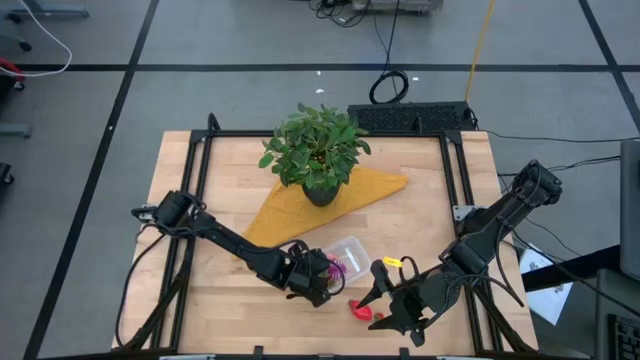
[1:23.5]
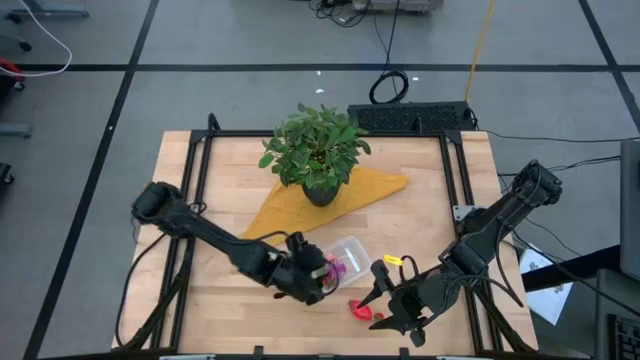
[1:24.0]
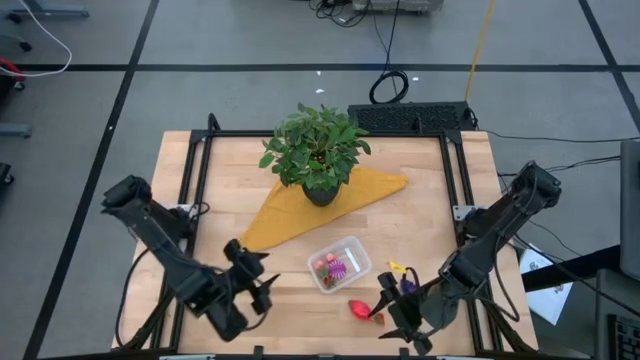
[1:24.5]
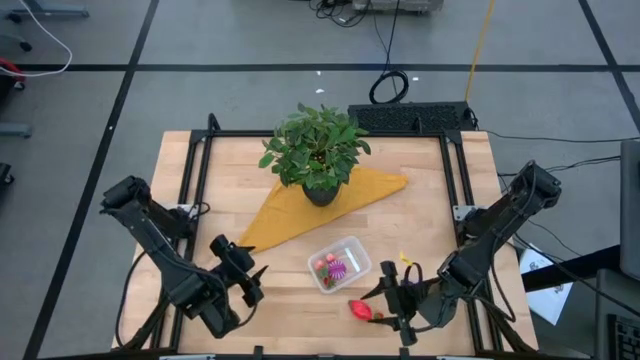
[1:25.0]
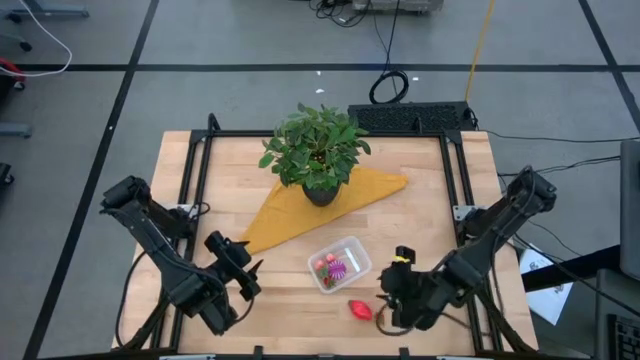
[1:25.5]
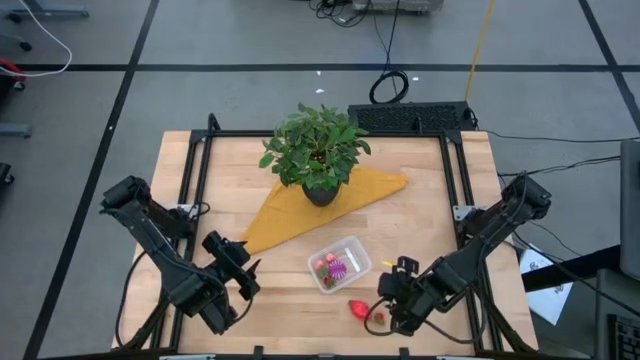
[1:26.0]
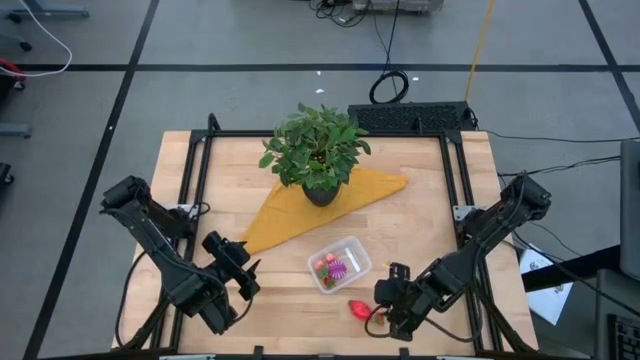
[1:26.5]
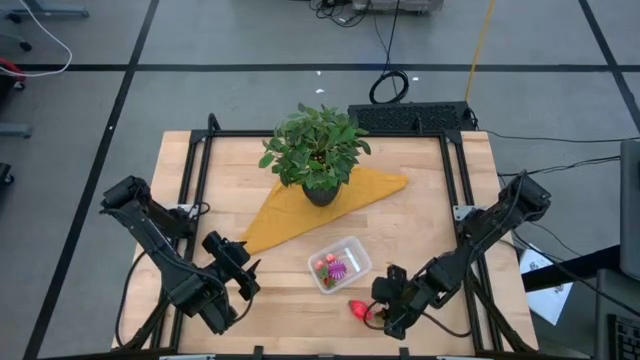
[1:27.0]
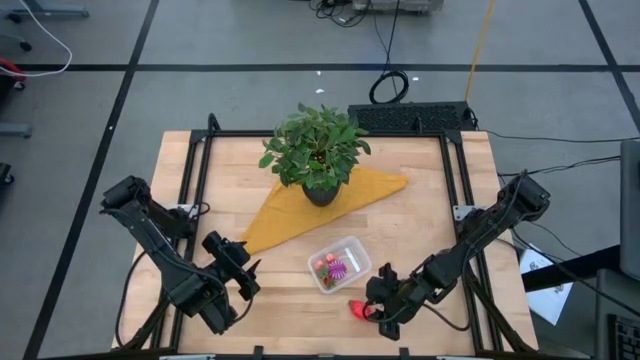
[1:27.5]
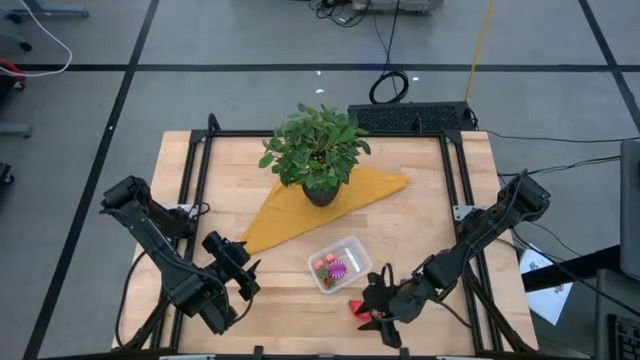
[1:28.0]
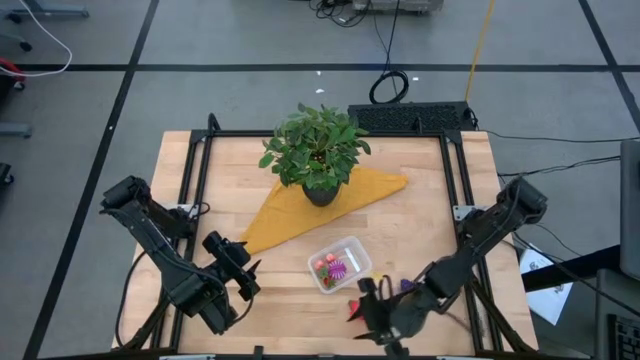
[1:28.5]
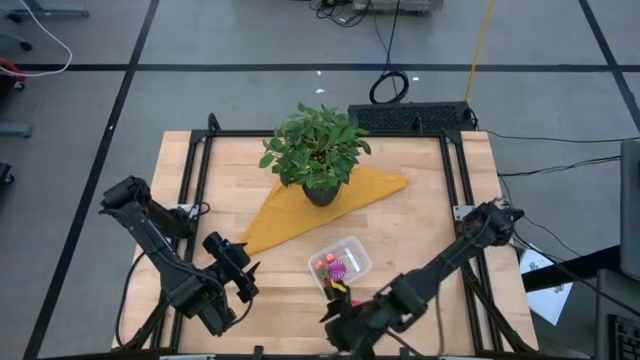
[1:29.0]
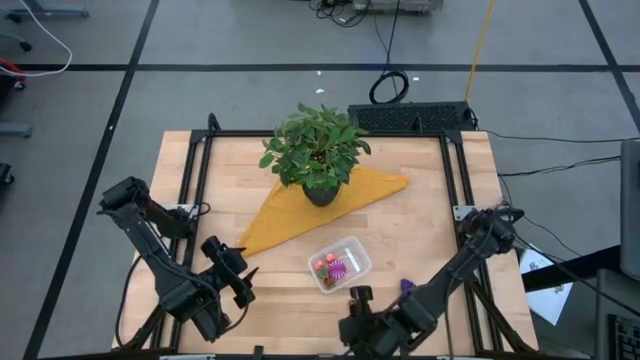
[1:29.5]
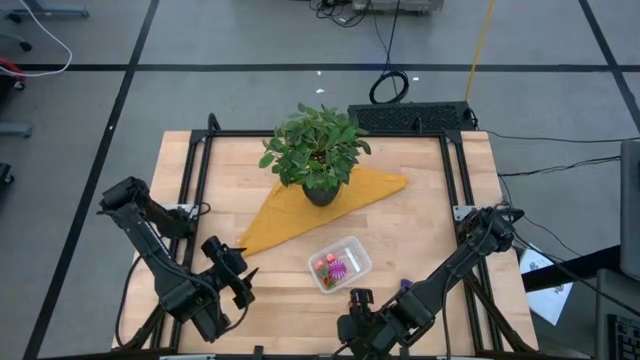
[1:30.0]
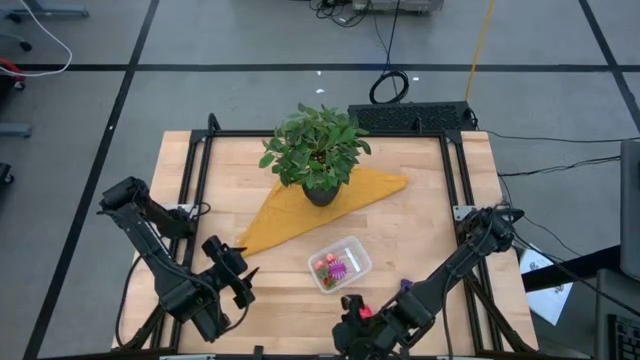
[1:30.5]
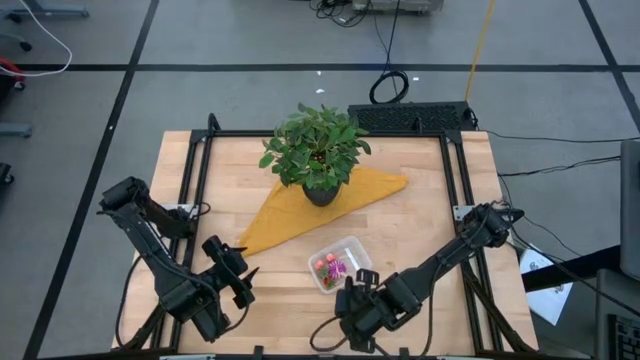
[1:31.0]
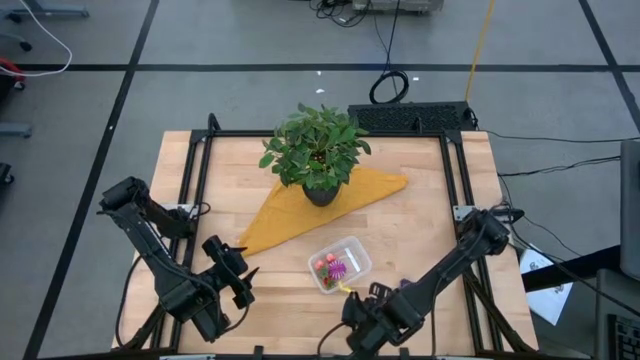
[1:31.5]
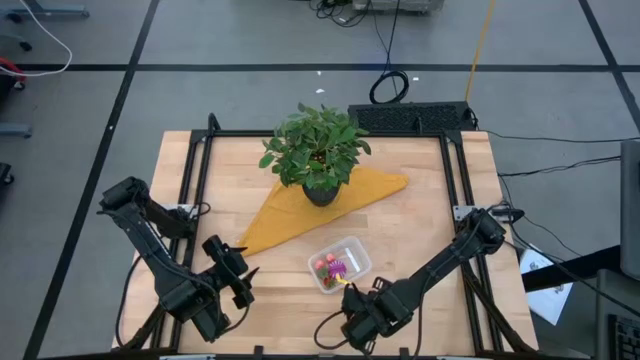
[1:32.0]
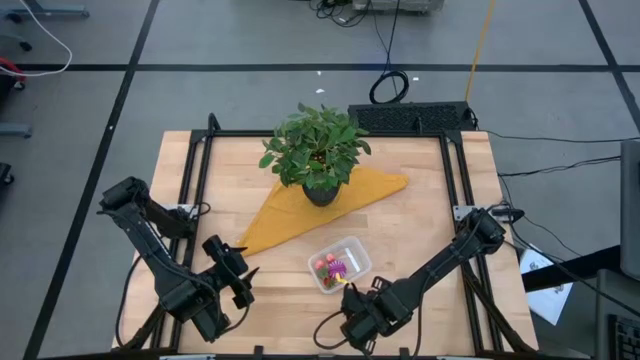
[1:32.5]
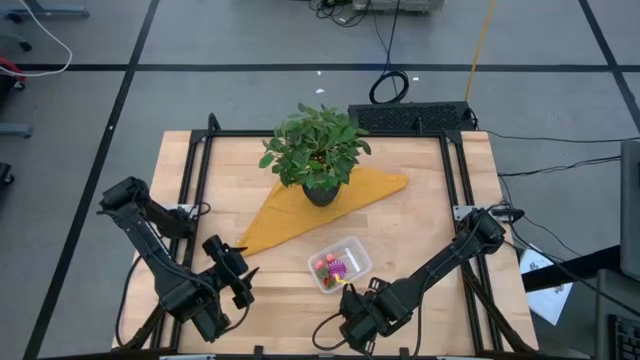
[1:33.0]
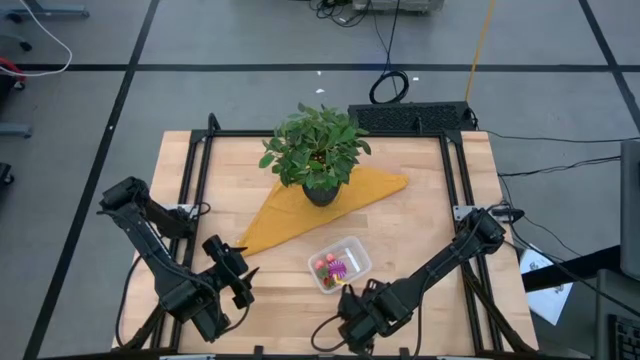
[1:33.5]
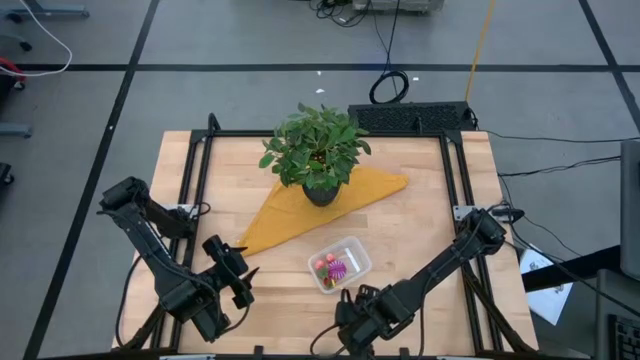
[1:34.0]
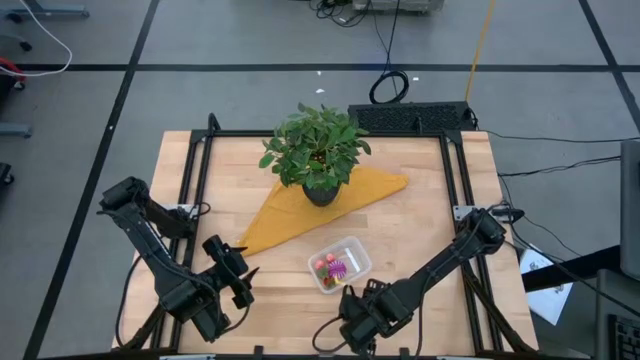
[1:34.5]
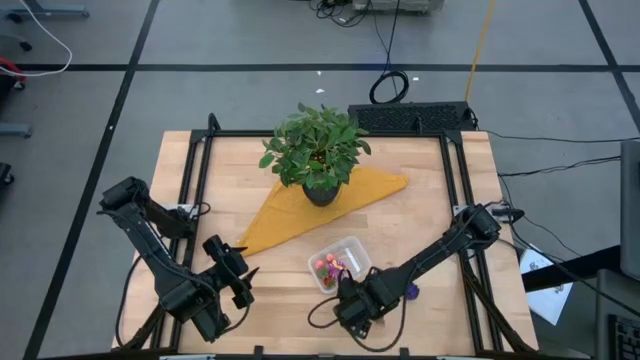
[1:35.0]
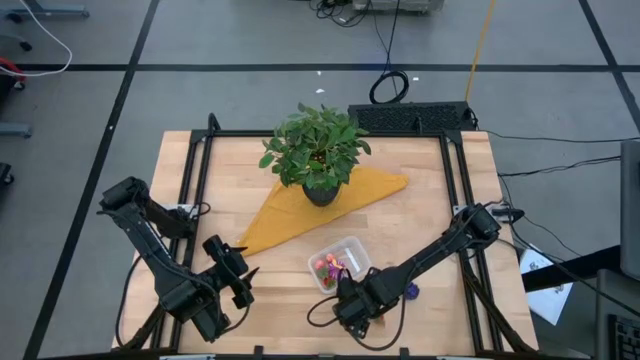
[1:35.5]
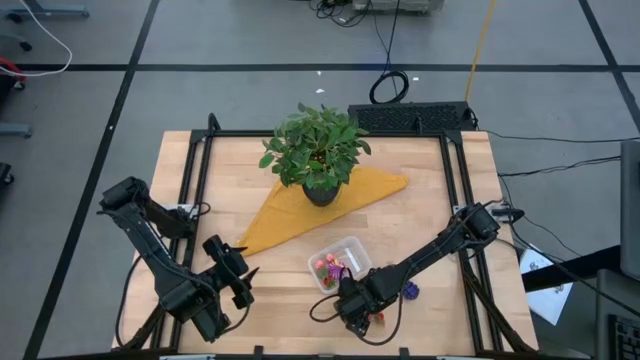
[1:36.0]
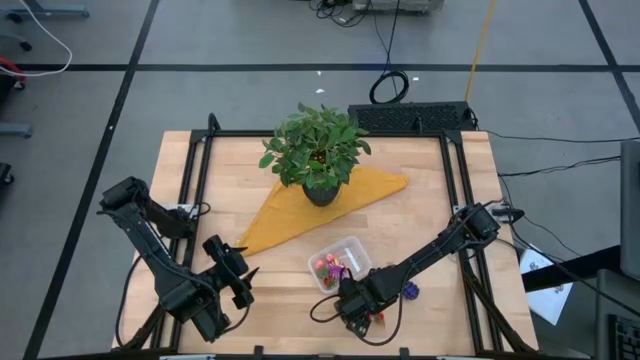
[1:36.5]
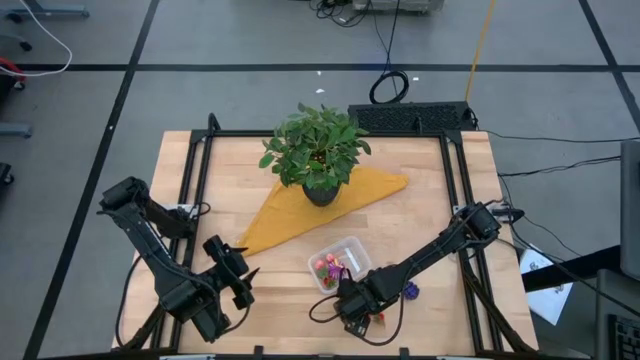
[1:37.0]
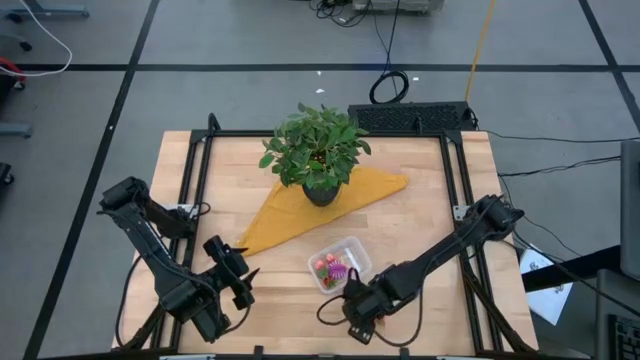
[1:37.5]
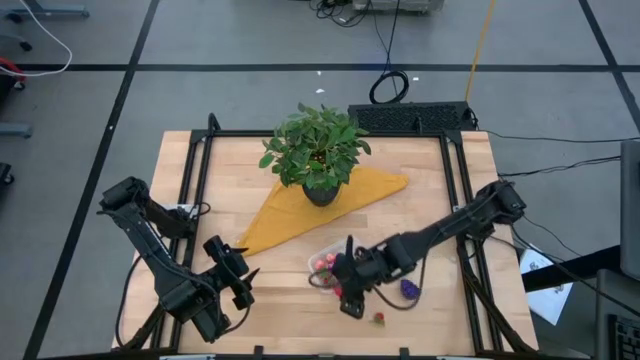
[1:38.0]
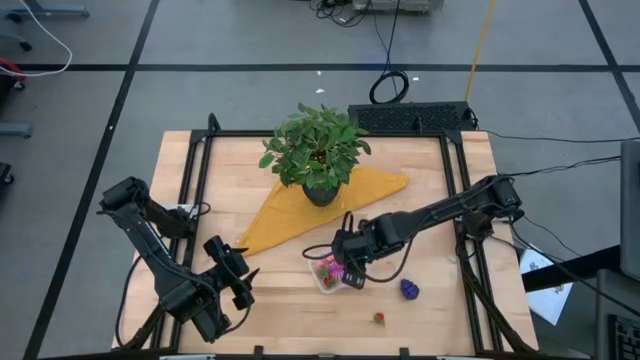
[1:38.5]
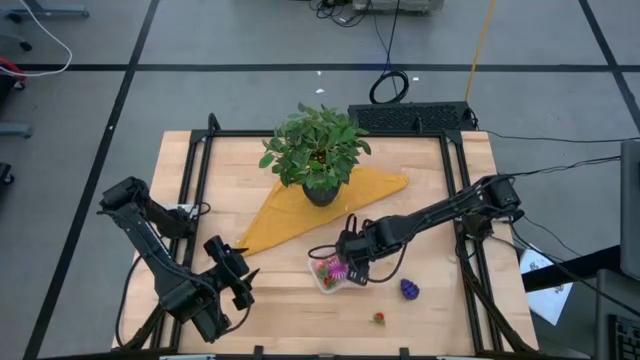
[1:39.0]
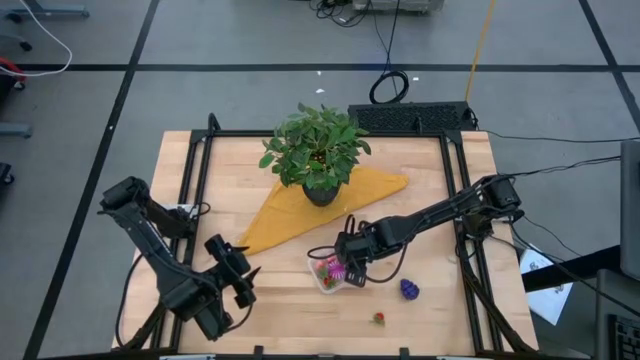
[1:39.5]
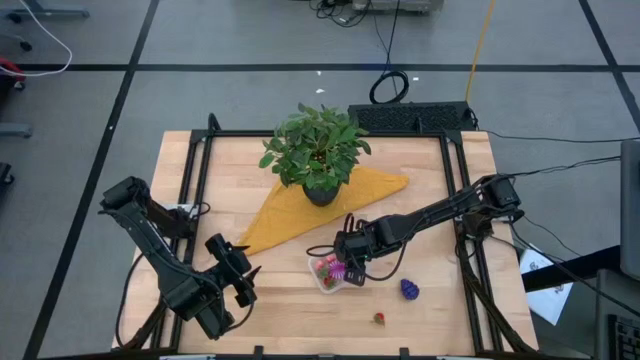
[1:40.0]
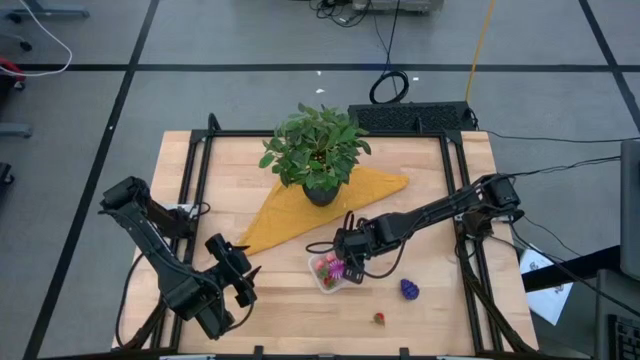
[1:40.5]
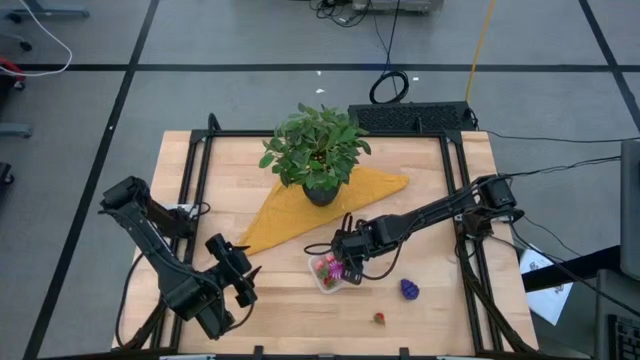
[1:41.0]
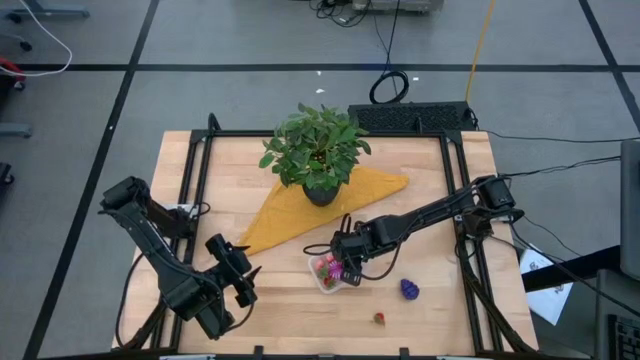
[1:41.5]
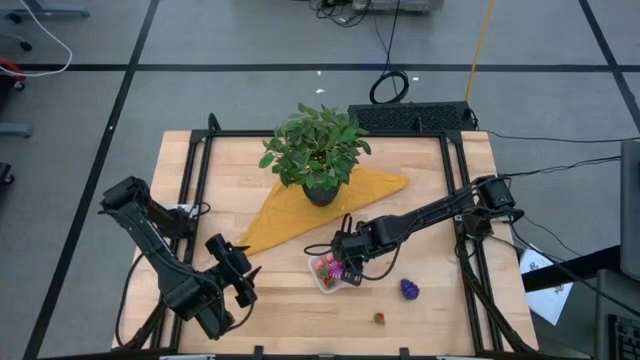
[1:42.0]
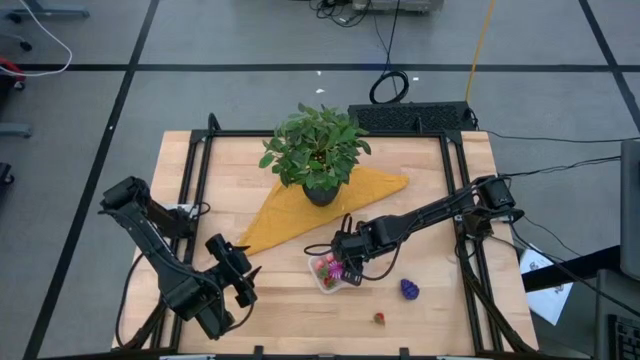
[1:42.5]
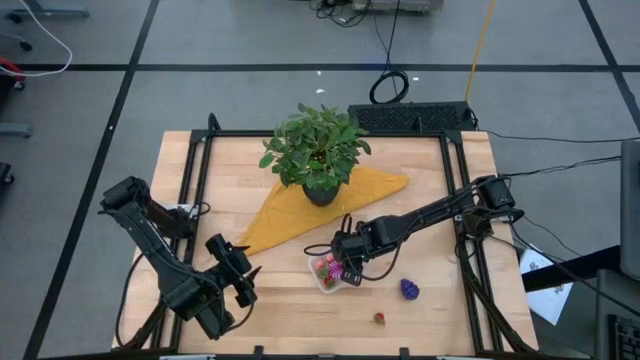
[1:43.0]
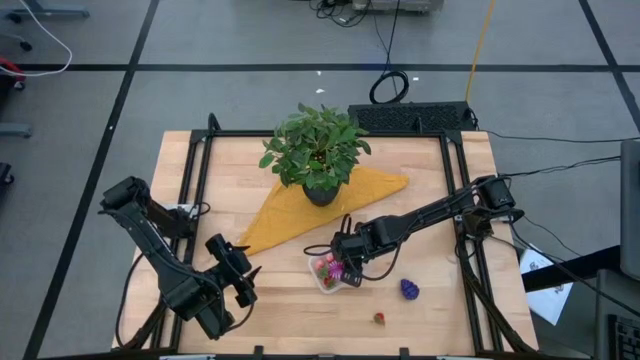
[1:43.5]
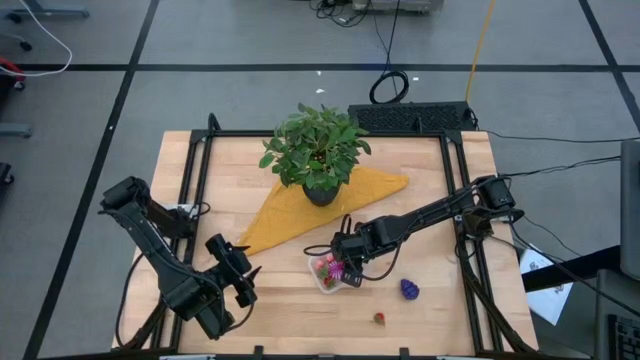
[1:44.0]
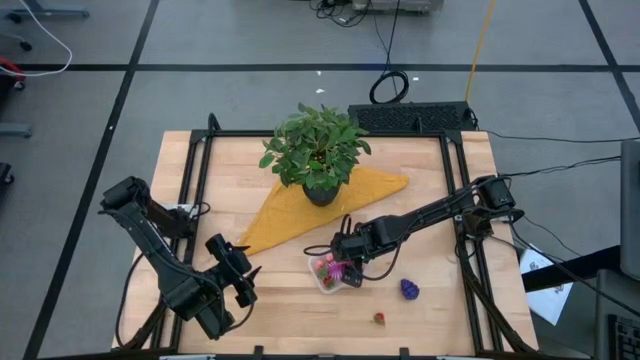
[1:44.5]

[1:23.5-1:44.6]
Task: Pick and placing Produce into tupperware
Put the dragon fruit into the transparent bin
